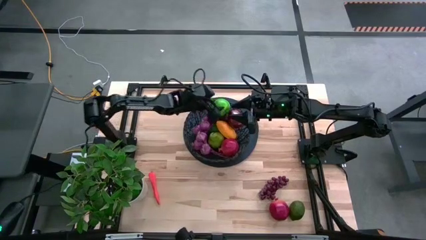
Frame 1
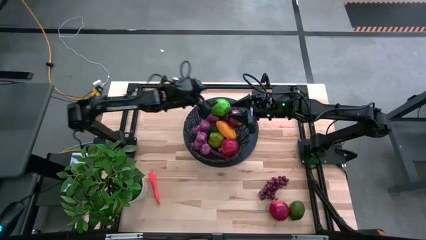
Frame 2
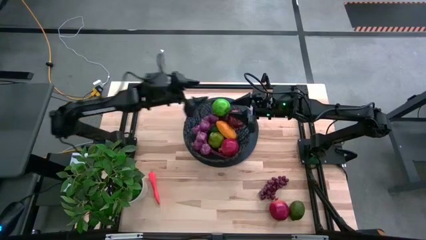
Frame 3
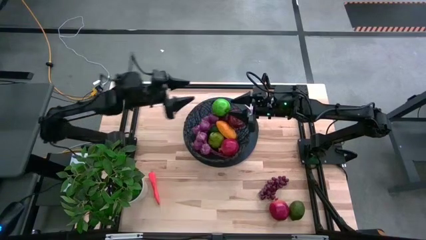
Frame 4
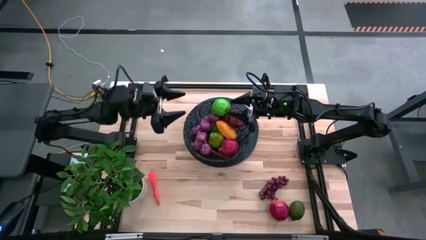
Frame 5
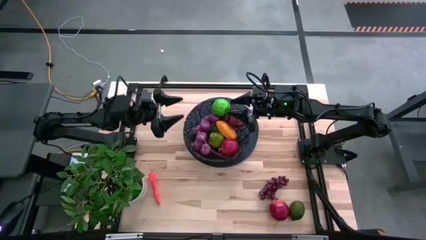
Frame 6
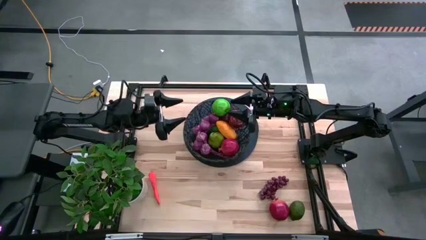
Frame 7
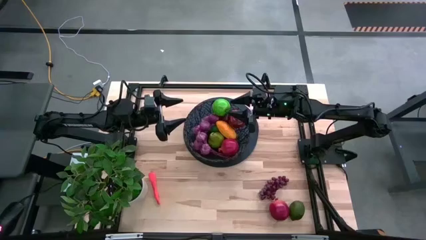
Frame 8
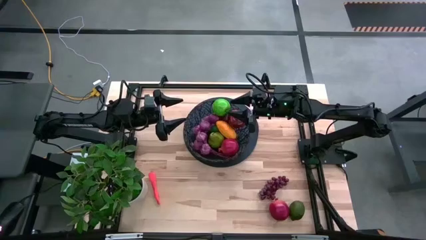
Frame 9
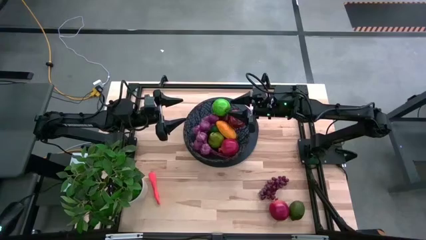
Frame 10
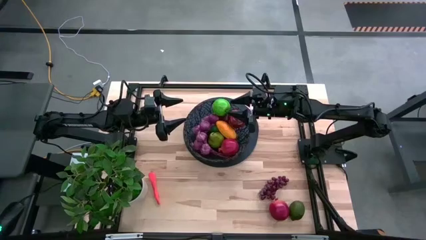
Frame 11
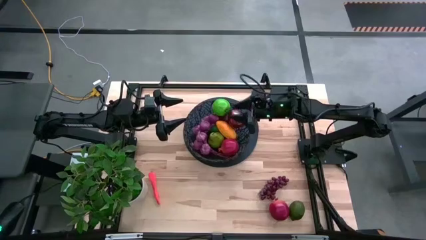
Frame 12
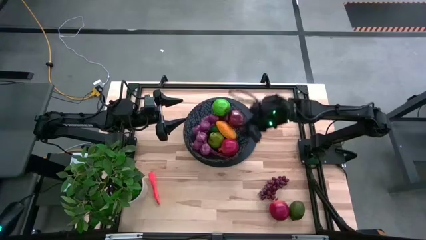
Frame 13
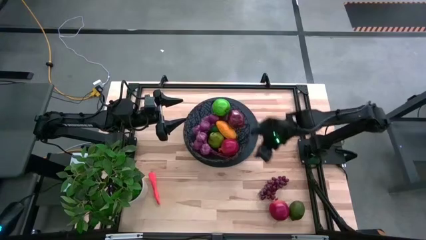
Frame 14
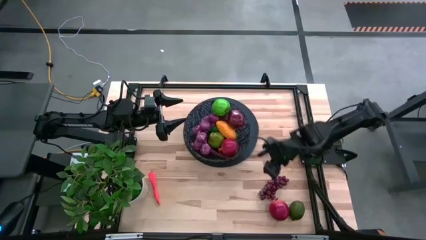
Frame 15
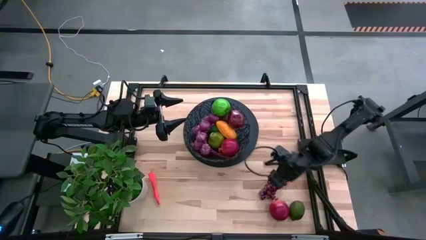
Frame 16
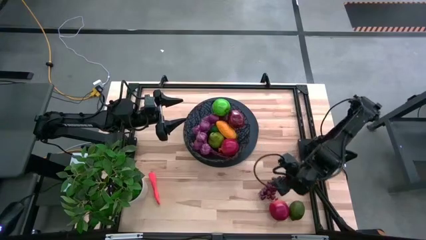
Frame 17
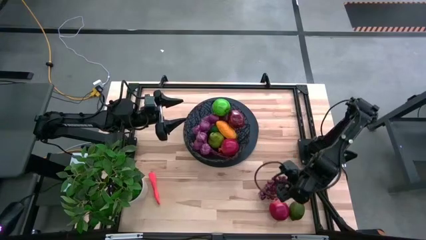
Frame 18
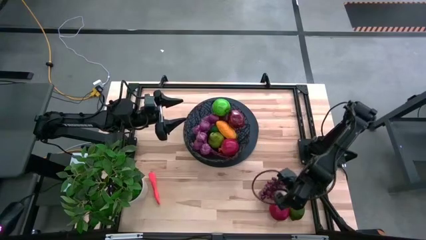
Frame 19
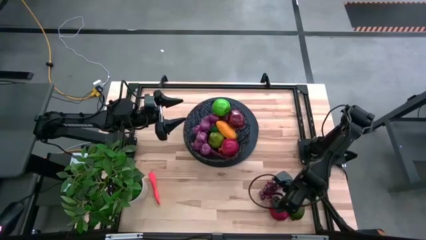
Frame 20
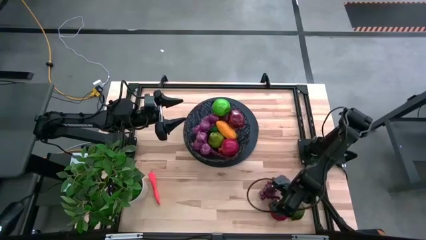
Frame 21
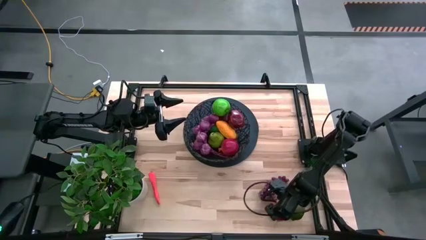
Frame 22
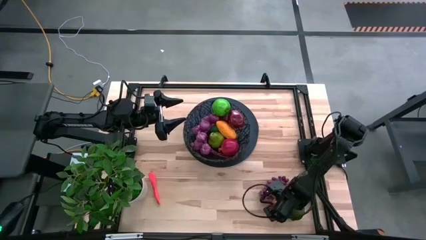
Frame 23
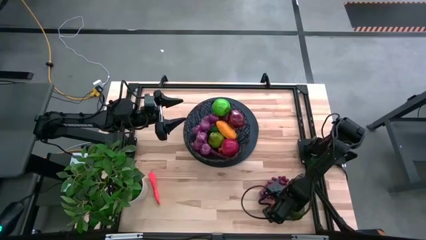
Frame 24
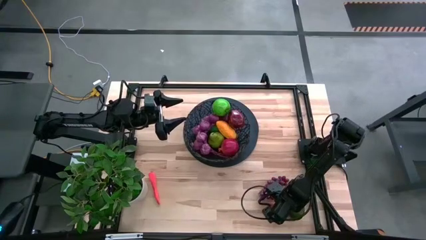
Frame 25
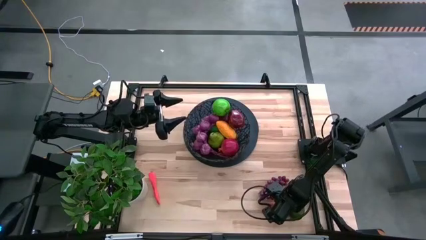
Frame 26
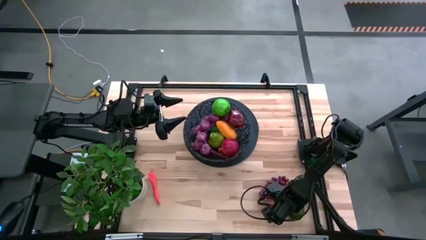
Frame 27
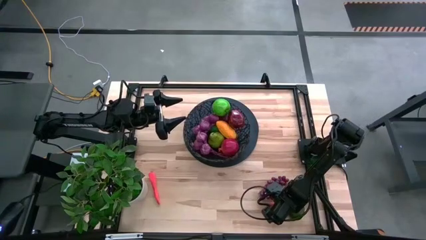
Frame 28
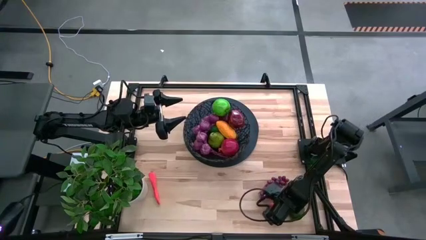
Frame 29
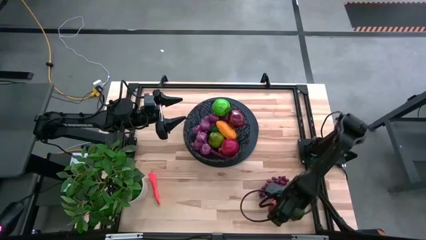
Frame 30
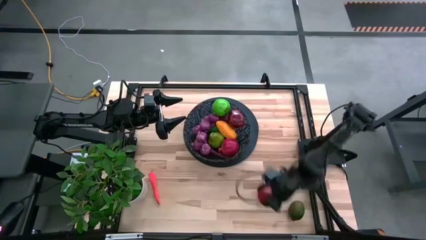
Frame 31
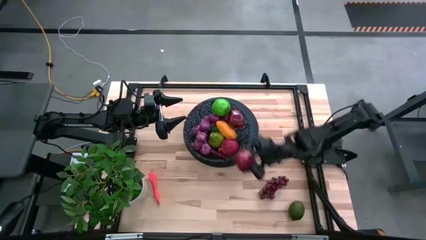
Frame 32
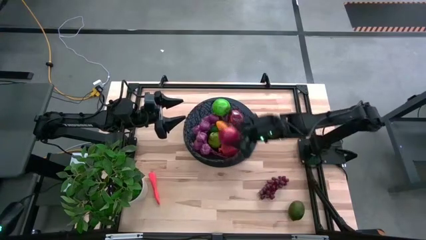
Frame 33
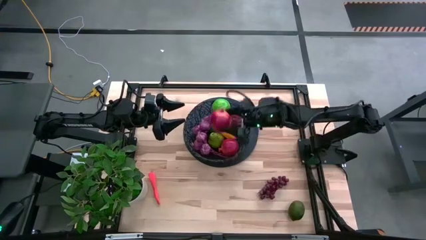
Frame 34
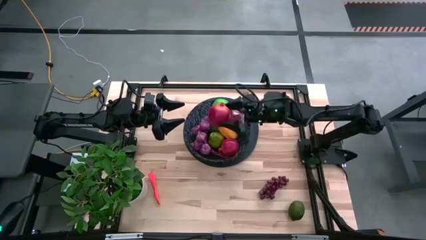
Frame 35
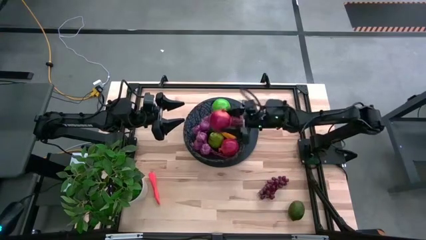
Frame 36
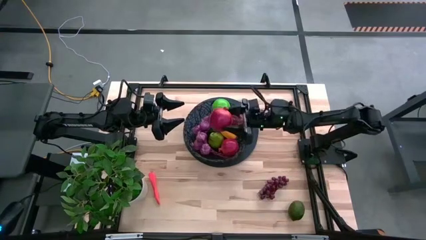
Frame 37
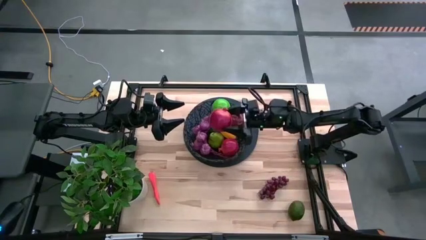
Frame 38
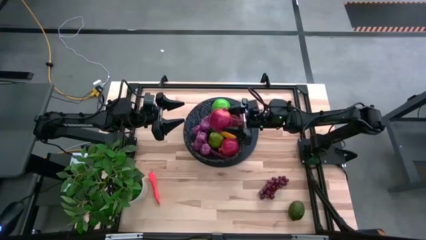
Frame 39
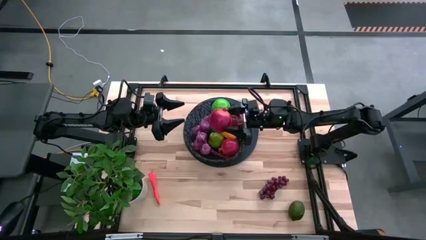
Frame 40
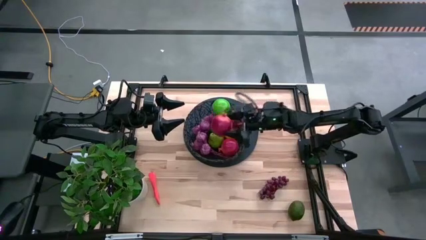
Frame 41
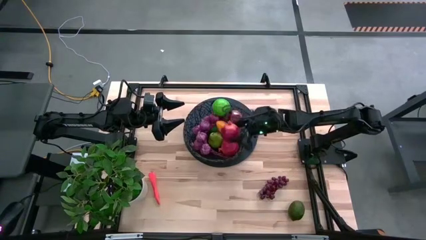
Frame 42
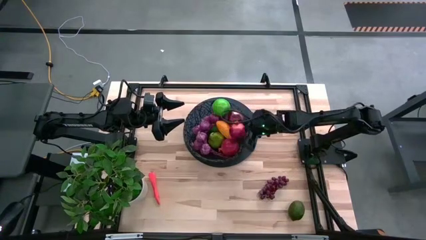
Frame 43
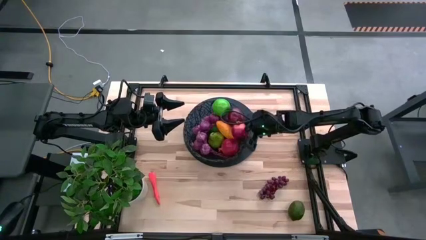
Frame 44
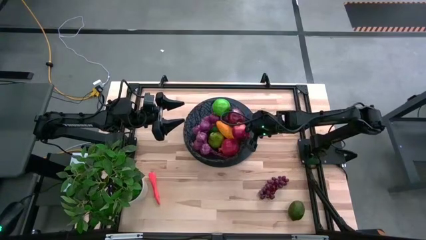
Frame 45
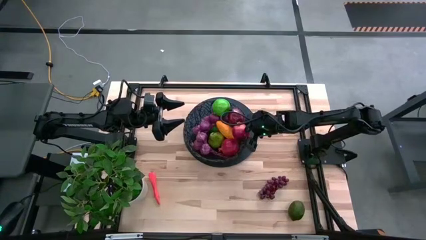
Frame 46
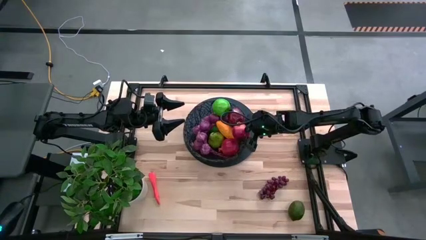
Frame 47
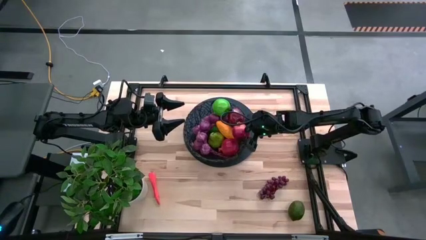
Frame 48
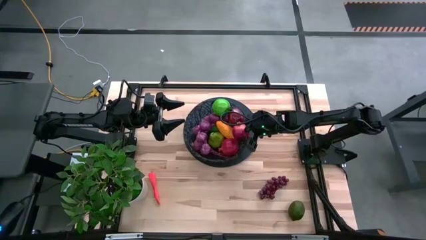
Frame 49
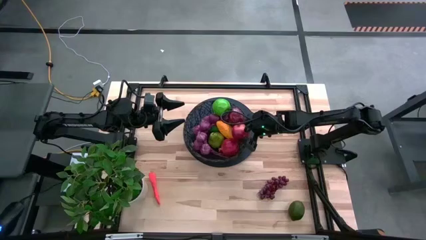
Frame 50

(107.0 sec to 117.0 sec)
Task: Build produce basket
Put the red pomegranate into basket

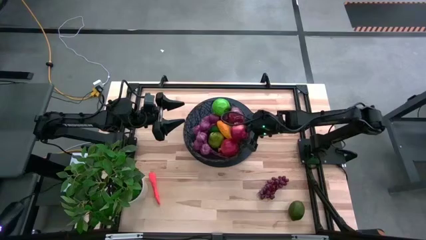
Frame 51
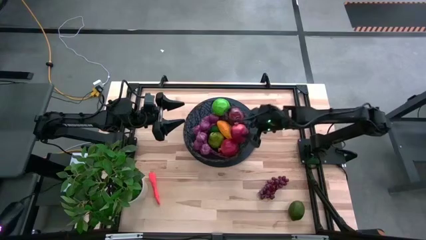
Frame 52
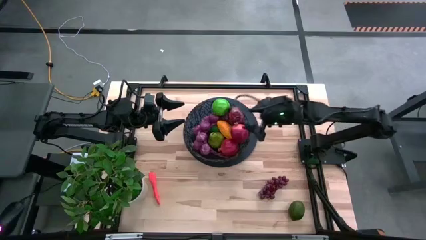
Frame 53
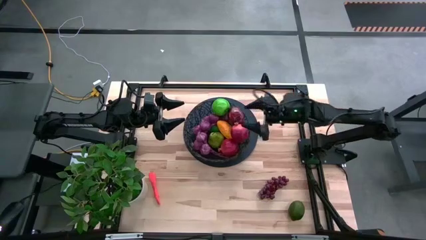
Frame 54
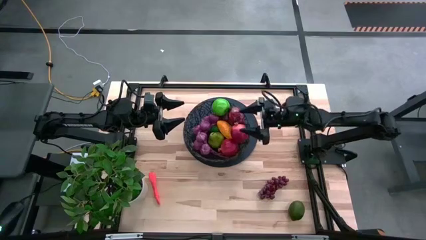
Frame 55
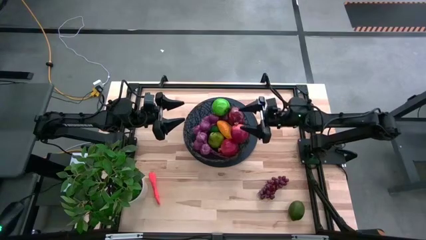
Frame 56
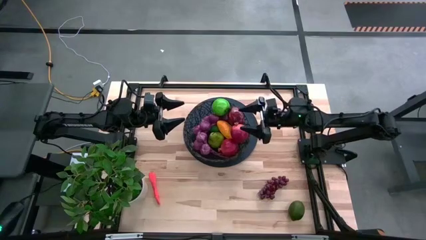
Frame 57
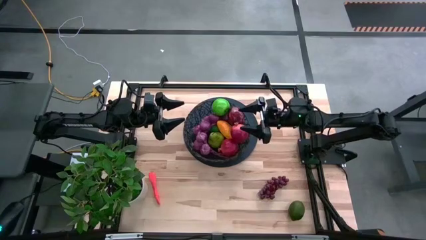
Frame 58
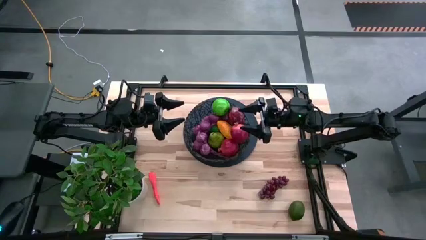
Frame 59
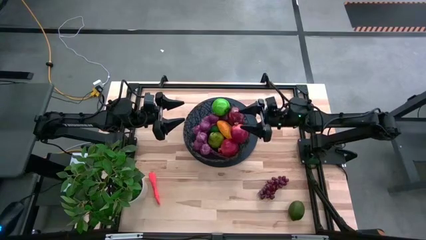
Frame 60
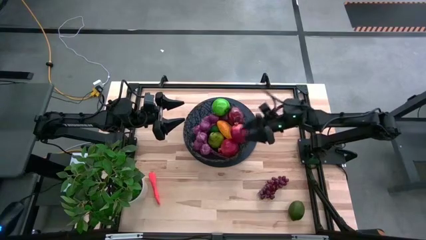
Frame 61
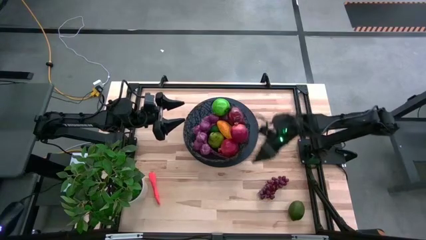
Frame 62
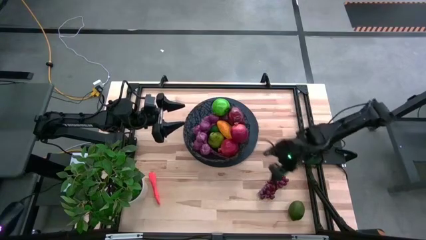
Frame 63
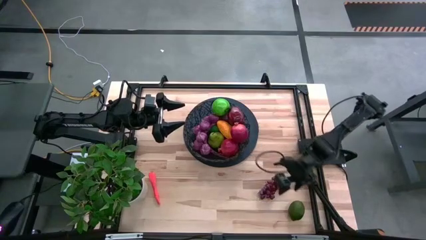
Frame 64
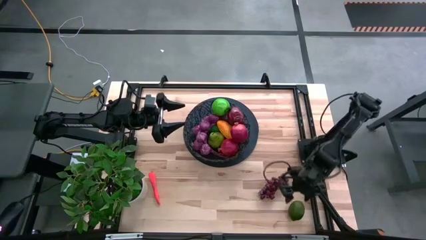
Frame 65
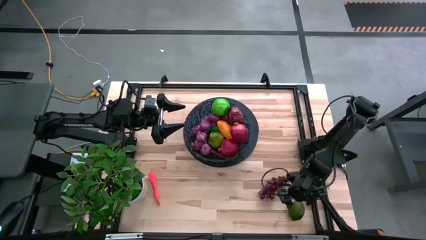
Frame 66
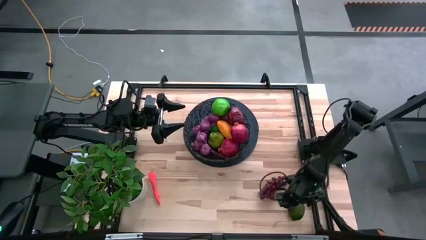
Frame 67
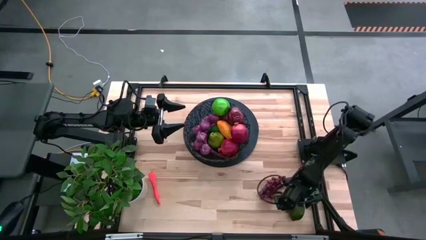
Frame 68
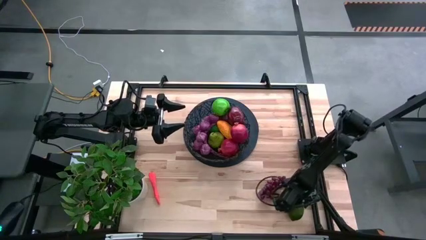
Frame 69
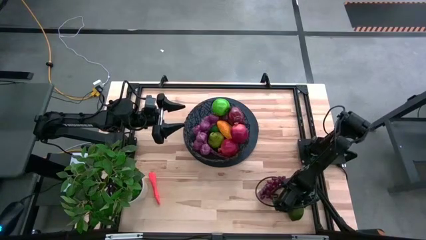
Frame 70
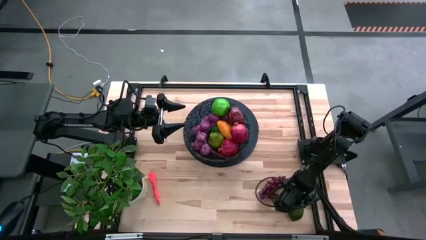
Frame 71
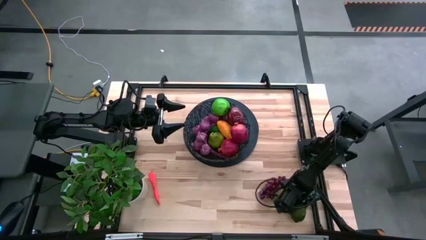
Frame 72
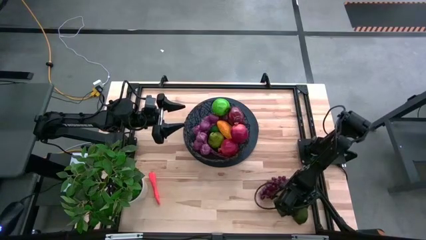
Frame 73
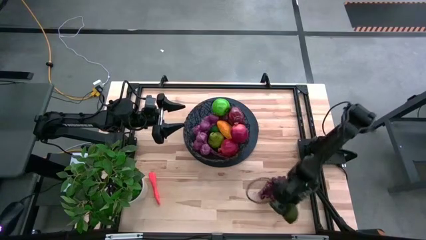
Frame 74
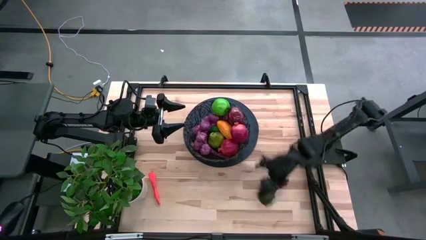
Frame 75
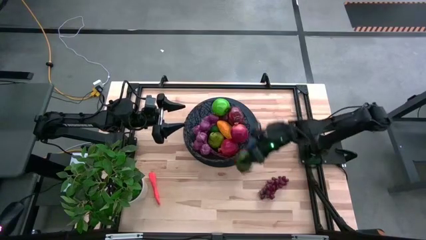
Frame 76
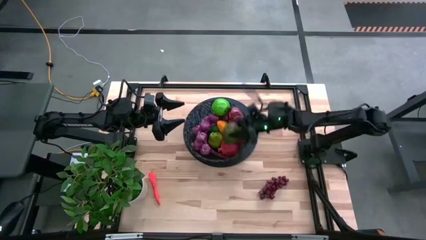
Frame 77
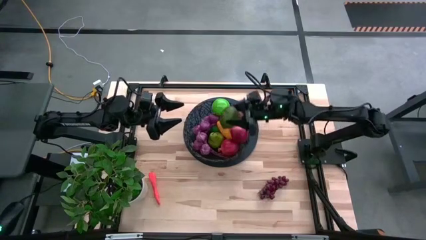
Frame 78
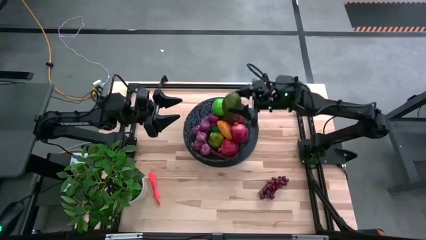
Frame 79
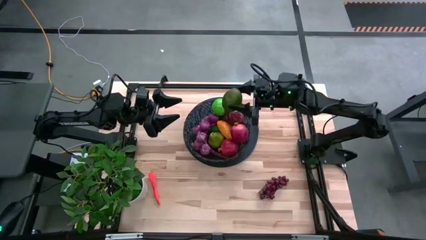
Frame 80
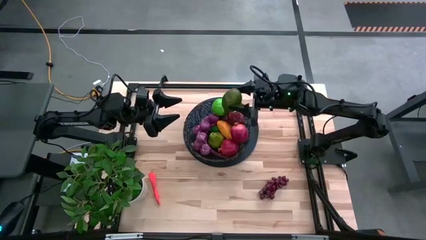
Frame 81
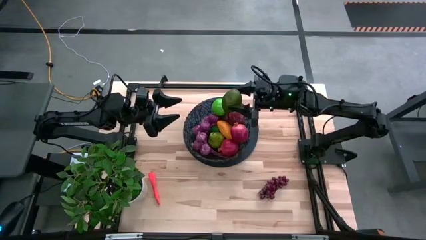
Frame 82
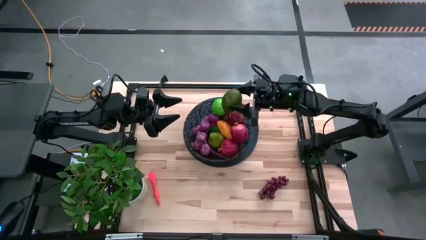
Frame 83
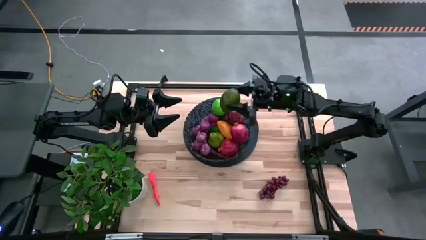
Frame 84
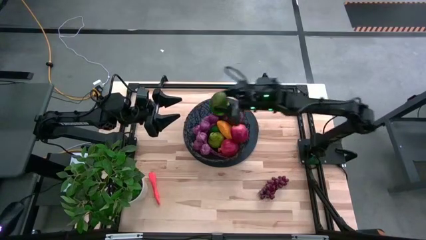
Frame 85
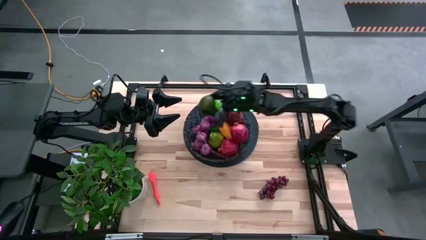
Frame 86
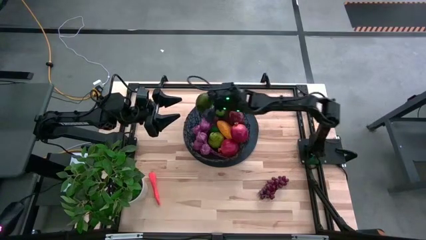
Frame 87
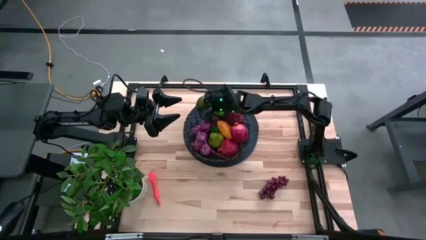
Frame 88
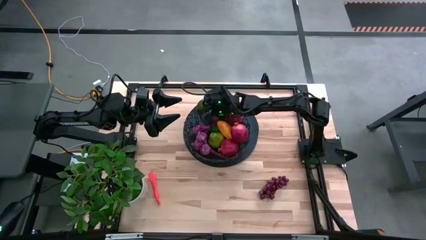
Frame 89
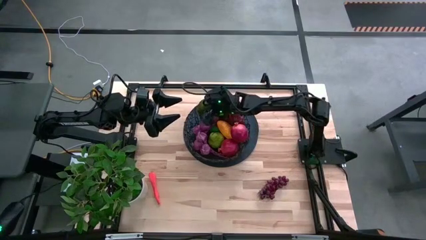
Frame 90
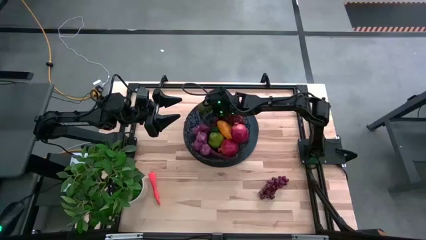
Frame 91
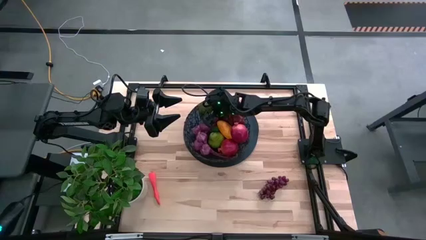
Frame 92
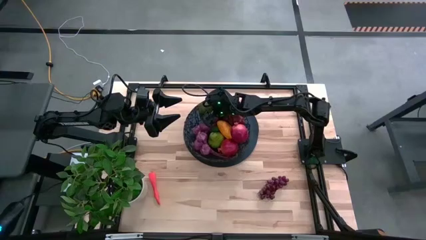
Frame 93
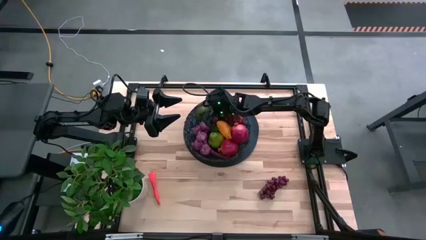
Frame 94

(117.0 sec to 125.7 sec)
Put the green lime into basket
